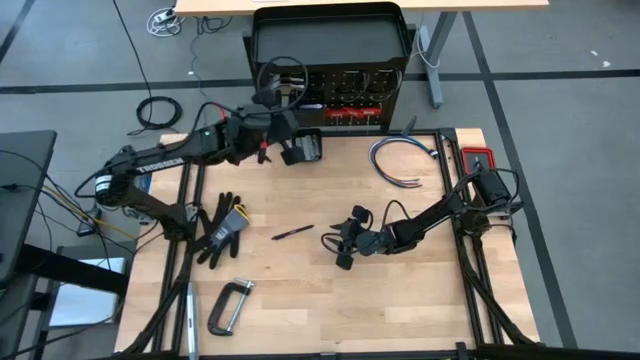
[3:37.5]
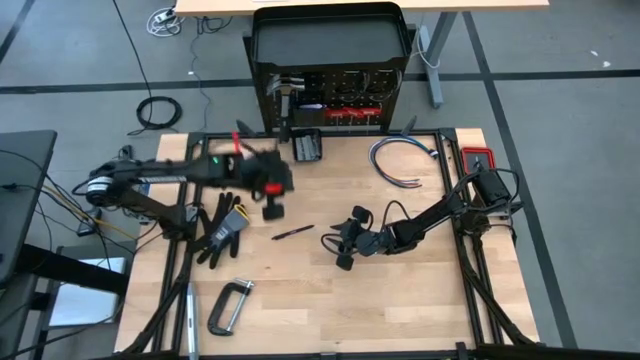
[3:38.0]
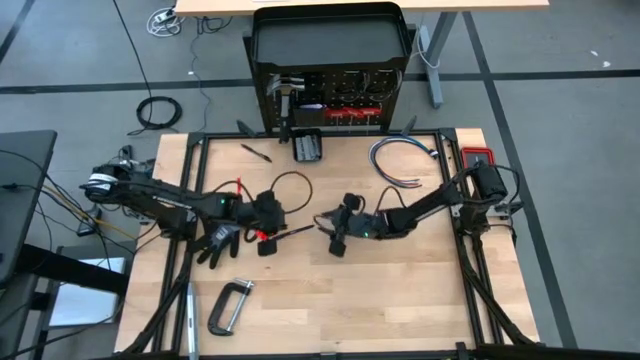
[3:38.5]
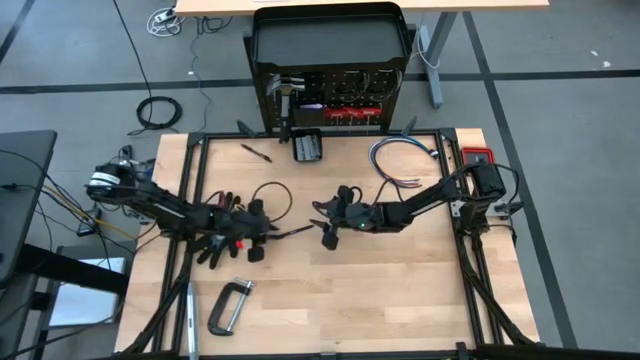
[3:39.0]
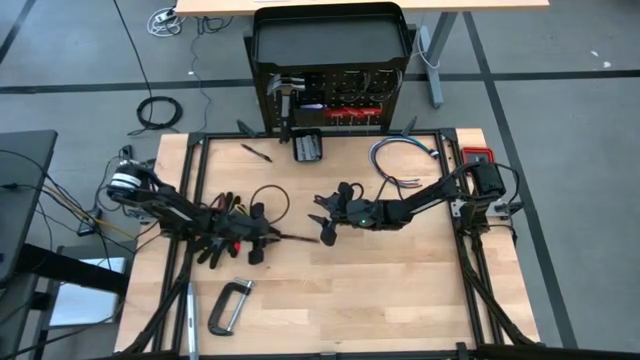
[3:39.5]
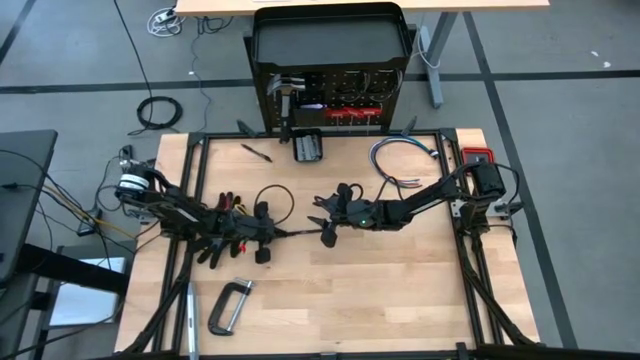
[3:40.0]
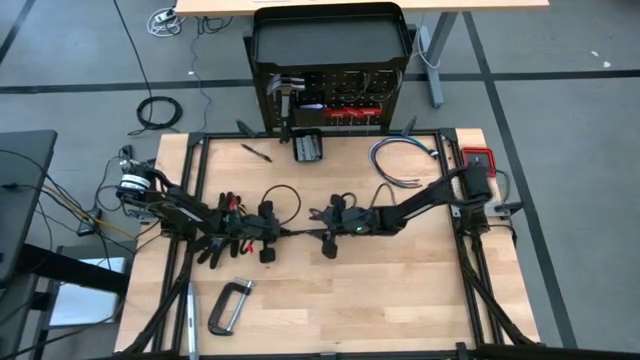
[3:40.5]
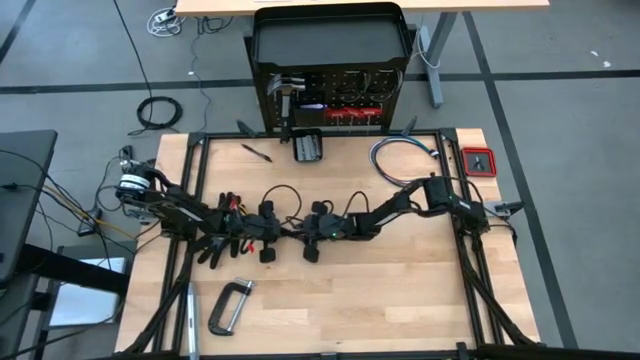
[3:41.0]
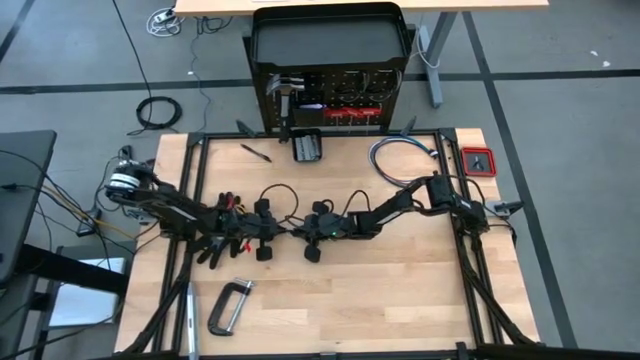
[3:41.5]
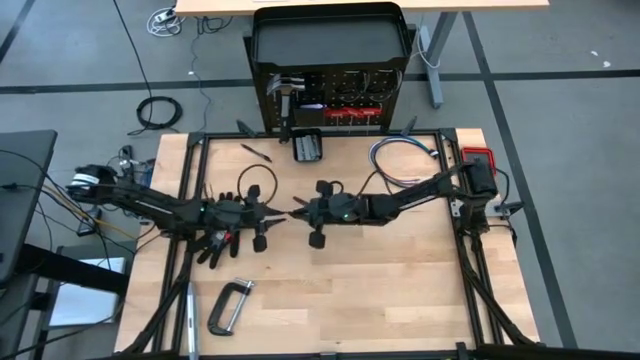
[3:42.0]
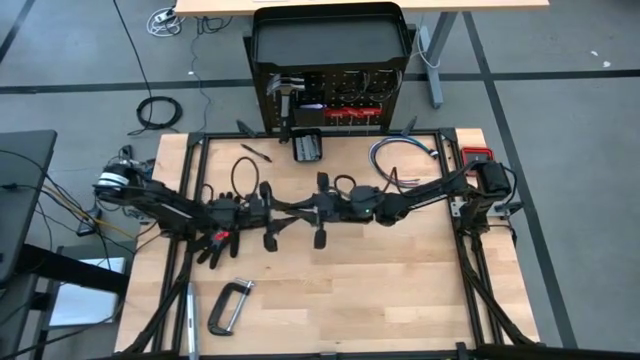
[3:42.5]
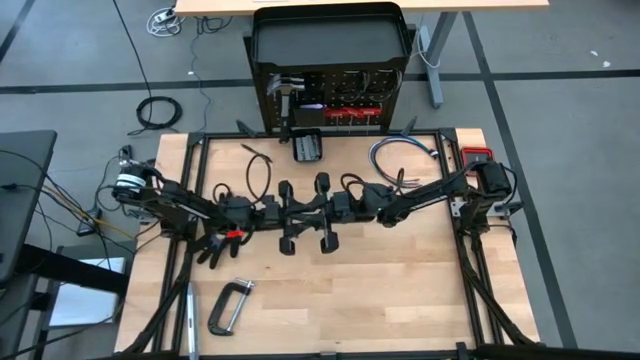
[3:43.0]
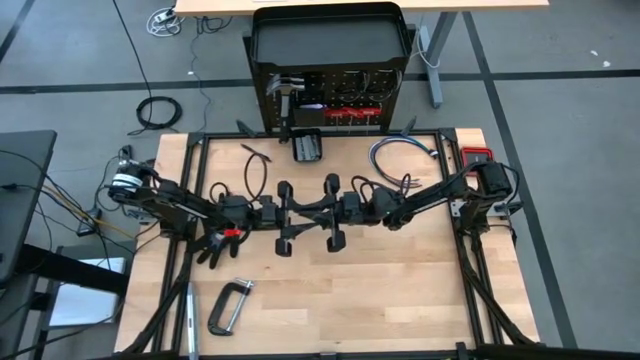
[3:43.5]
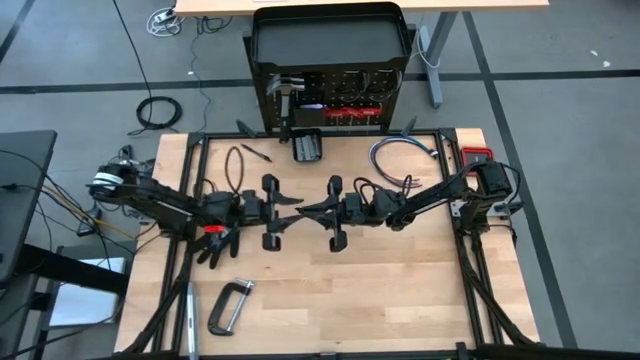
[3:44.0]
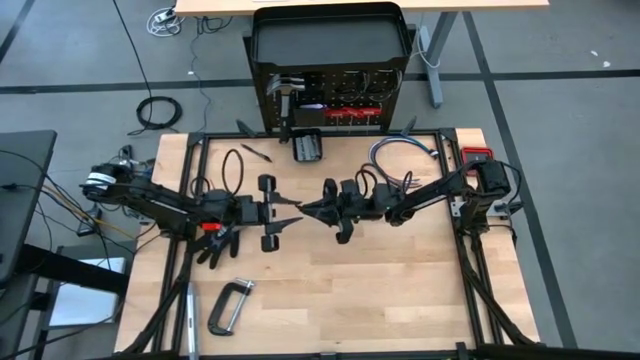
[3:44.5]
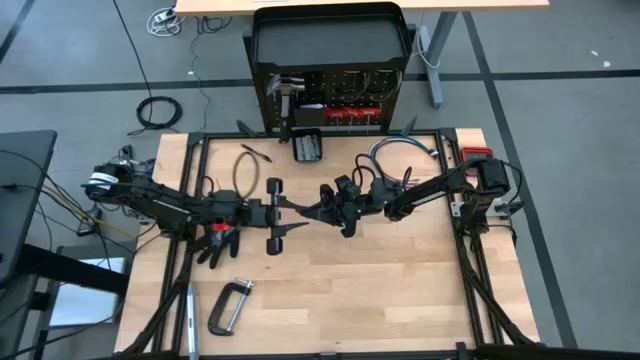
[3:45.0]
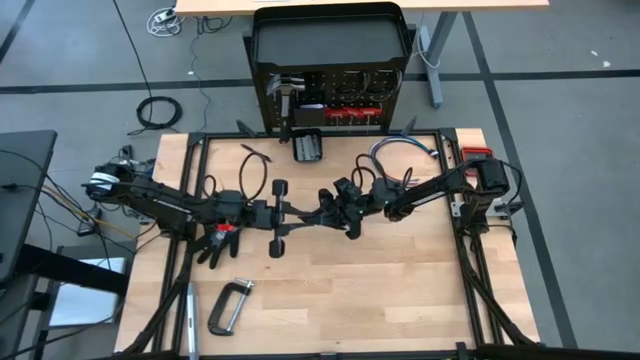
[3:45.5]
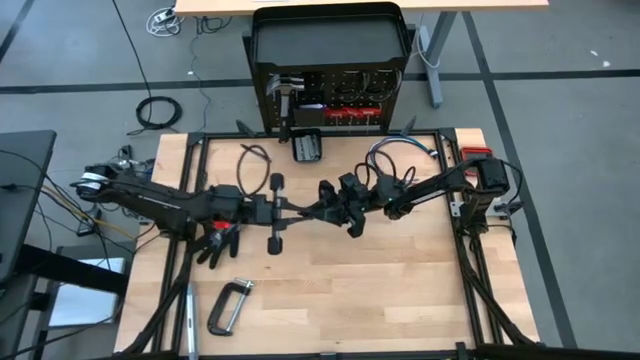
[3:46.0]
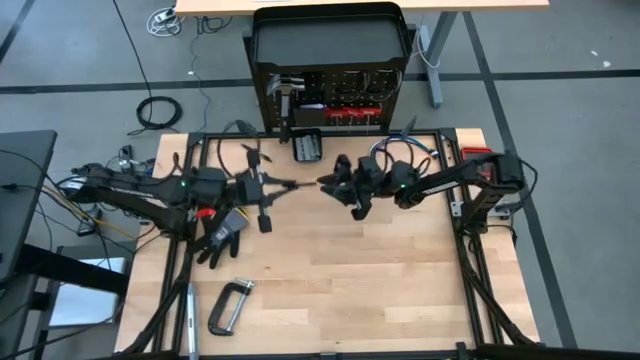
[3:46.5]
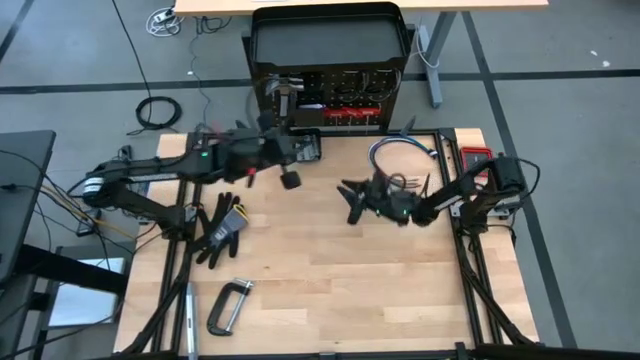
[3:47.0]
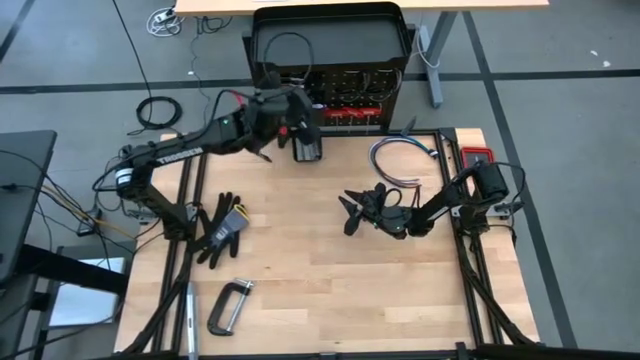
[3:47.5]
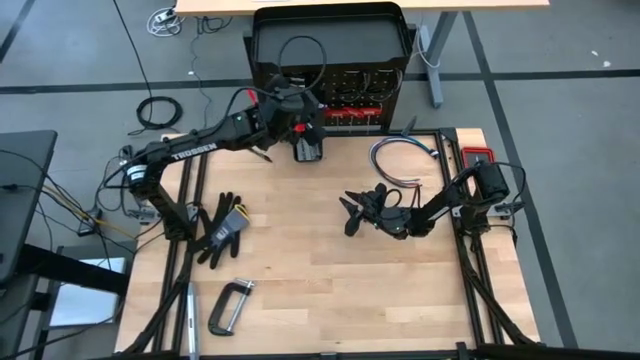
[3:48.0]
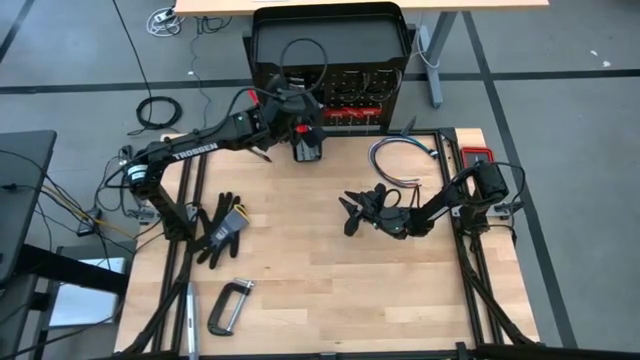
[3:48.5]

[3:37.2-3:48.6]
Task: Hang tools onto peg board
Put the black pen on the peg board

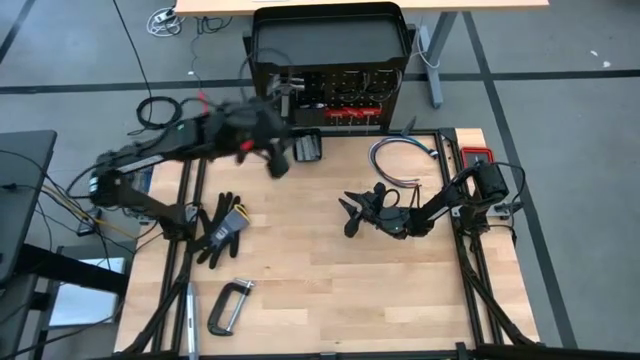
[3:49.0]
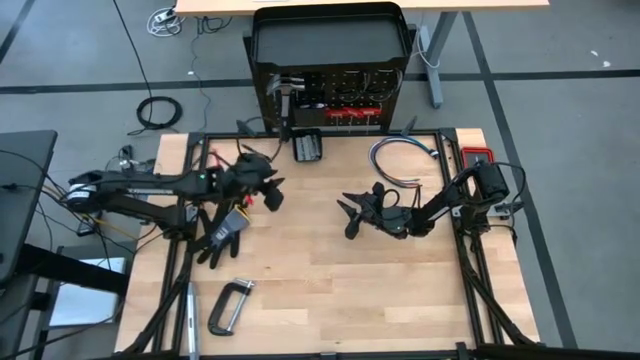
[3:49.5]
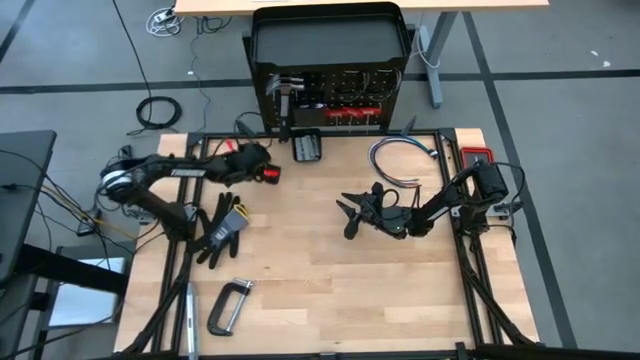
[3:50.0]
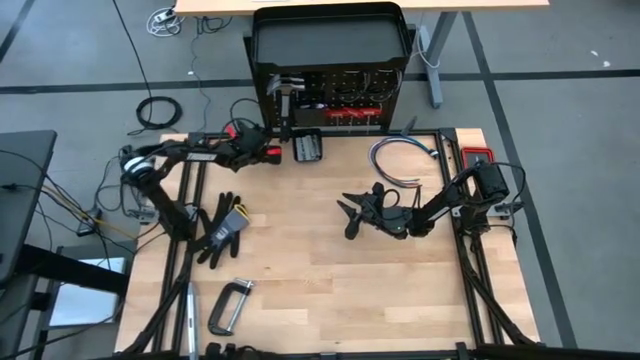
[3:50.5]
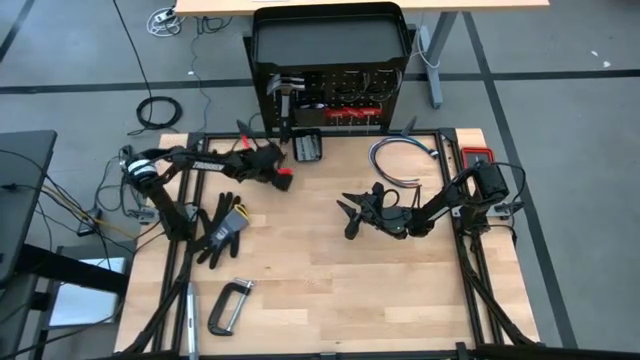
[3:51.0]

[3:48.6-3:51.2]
Put the black pen on the peg board

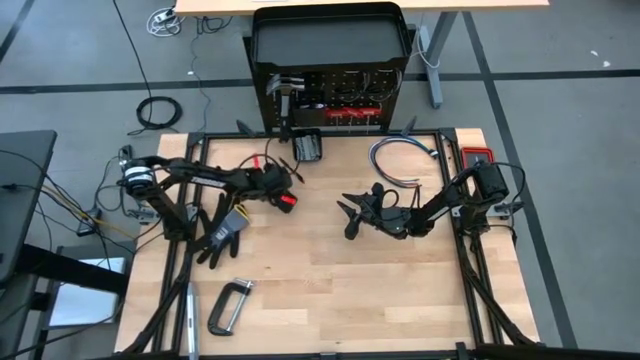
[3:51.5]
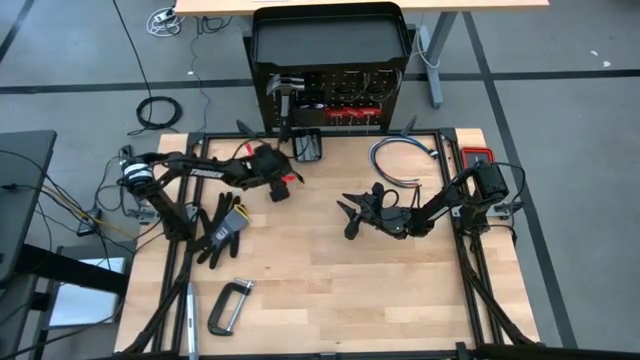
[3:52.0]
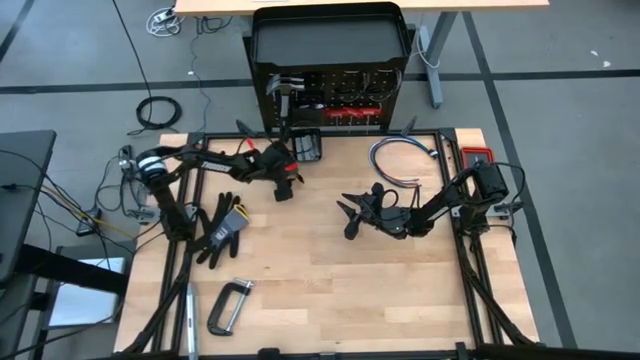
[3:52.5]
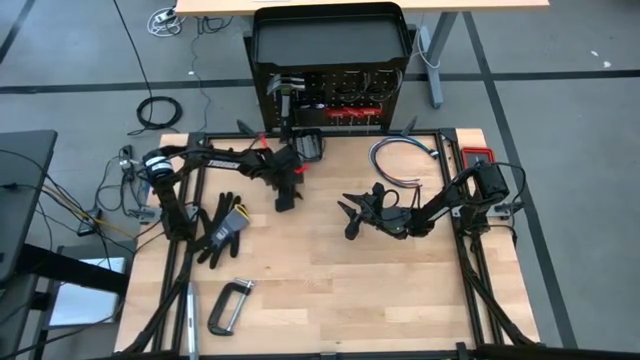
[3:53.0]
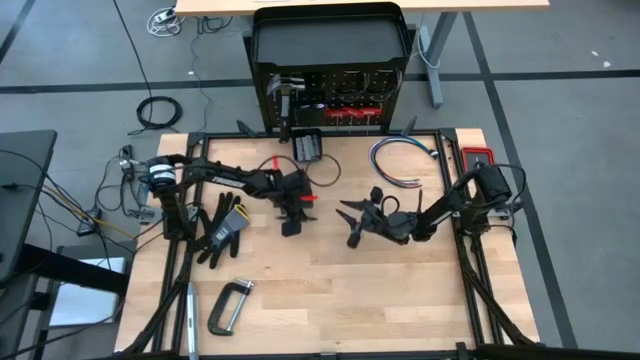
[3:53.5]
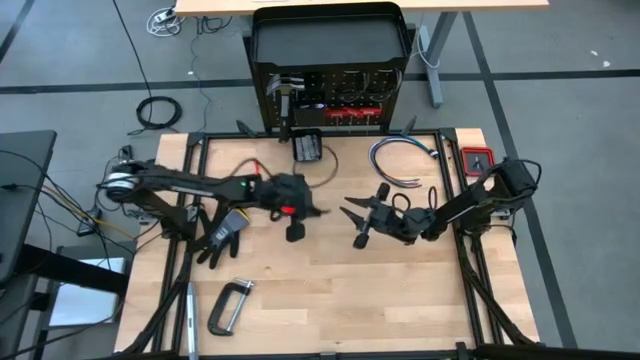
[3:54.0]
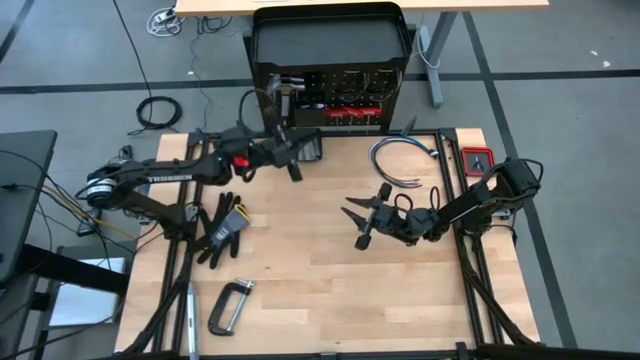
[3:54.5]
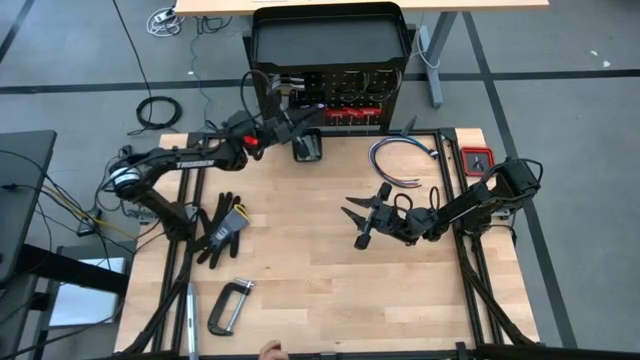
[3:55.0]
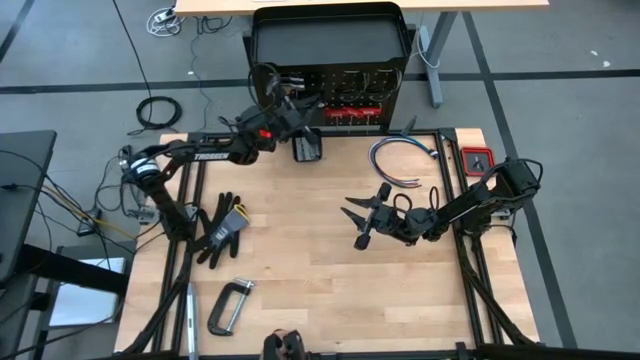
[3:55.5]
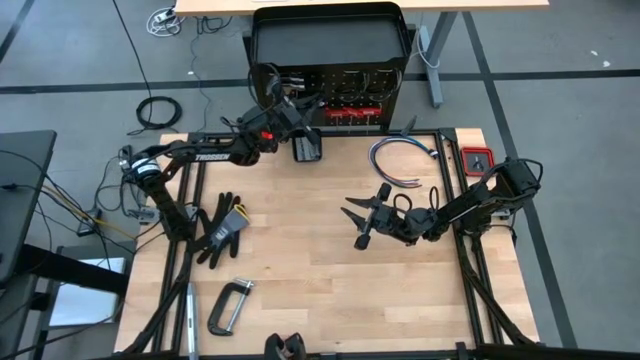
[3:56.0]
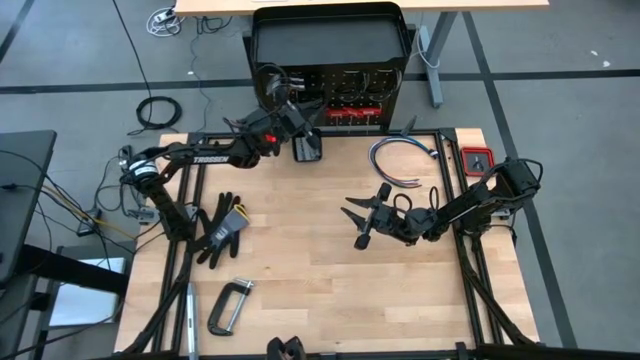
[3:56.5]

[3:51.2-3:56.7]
Put the black pen on the peg board

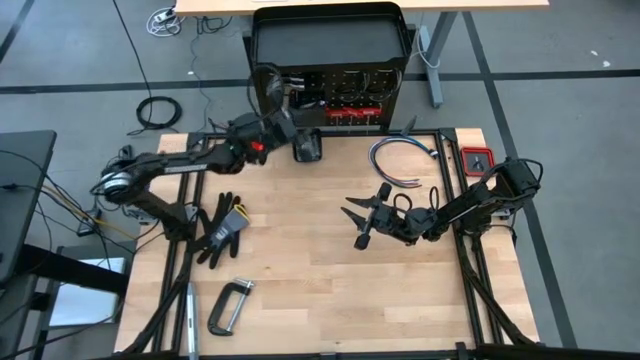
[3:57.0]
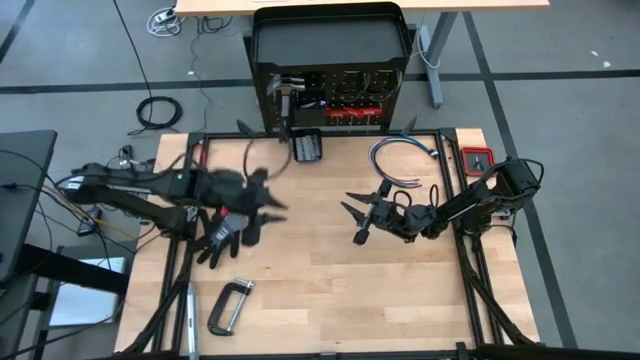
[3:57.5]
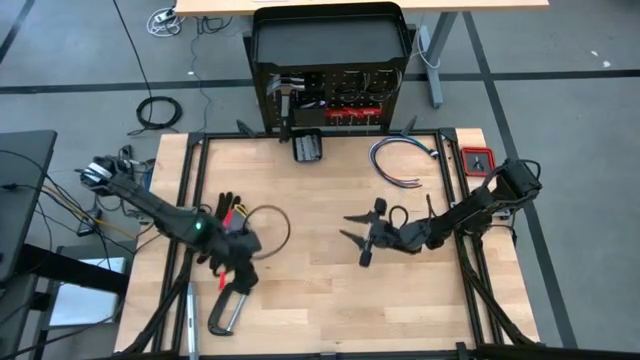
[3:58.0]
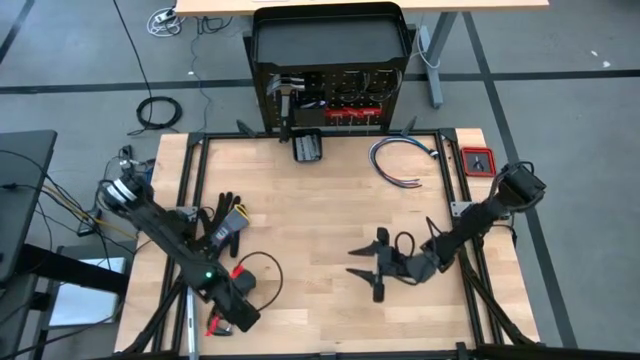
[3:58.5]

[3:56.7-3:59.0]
Put the black clamp on the on the peg board
